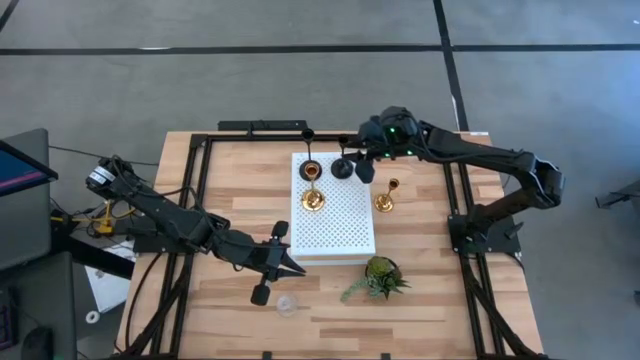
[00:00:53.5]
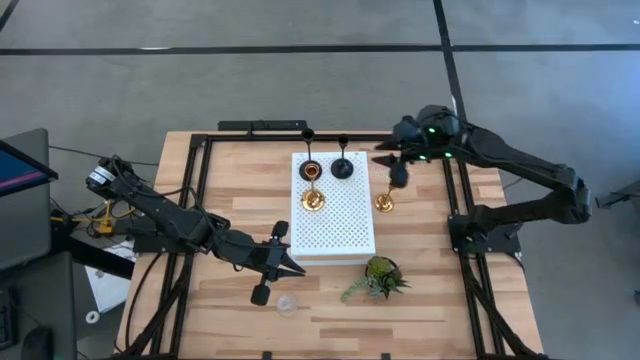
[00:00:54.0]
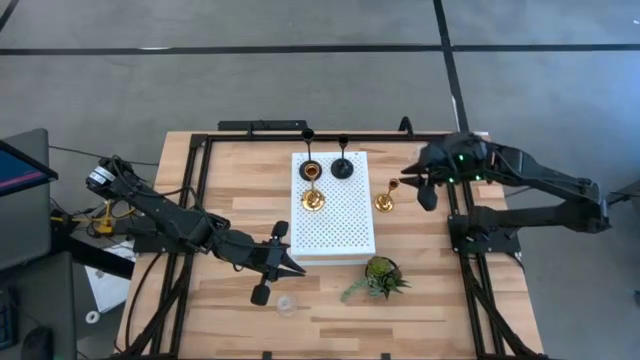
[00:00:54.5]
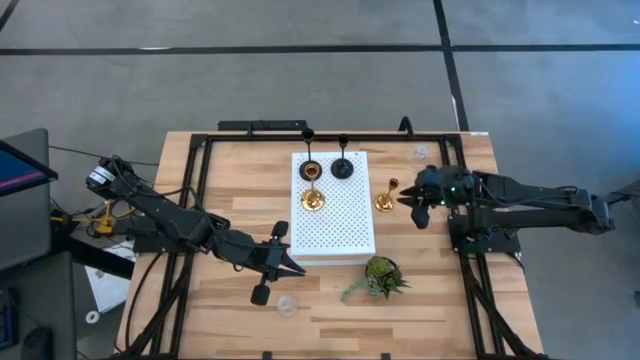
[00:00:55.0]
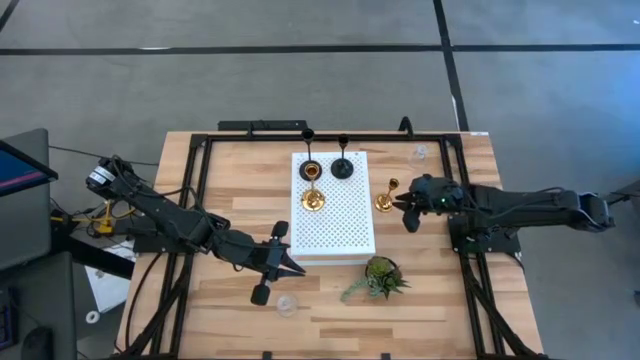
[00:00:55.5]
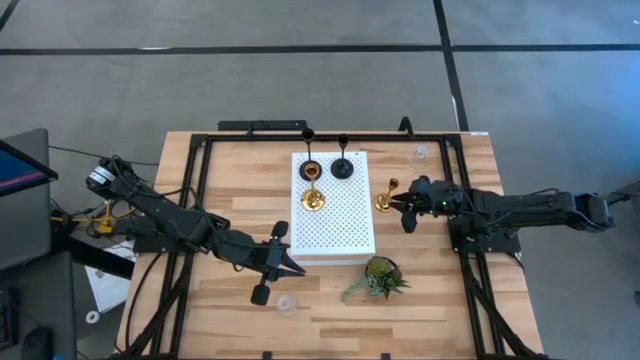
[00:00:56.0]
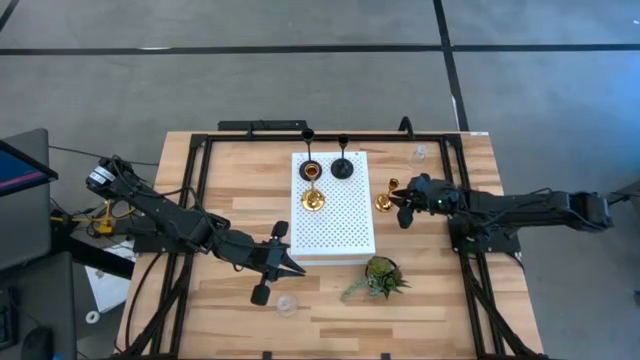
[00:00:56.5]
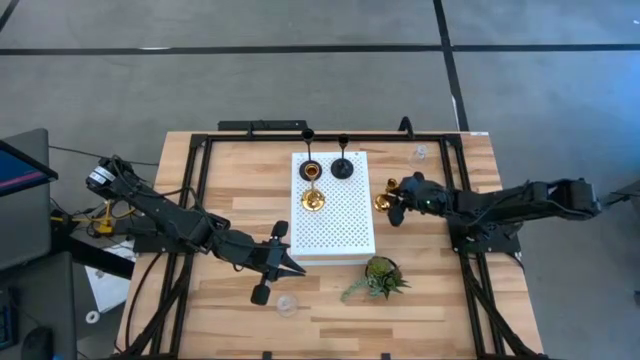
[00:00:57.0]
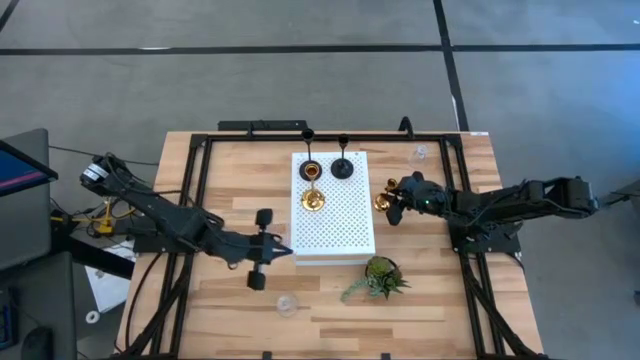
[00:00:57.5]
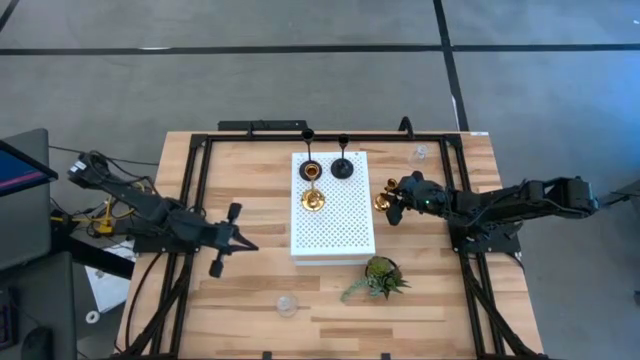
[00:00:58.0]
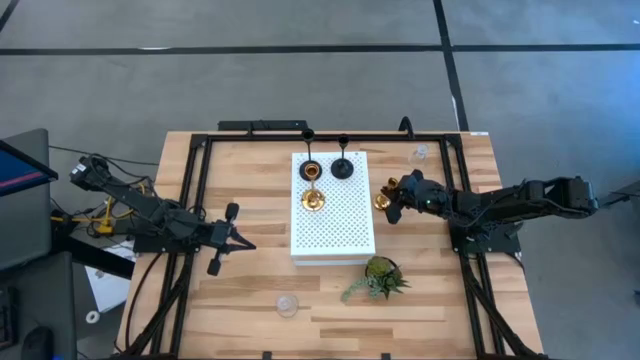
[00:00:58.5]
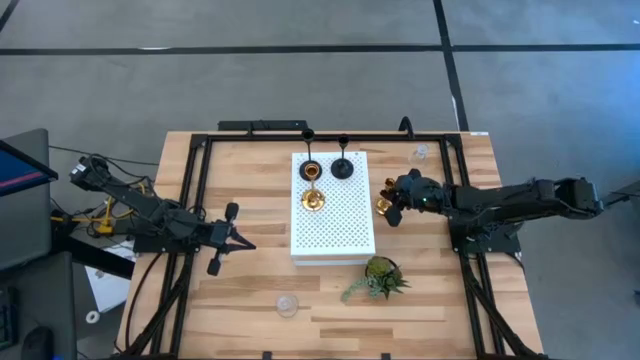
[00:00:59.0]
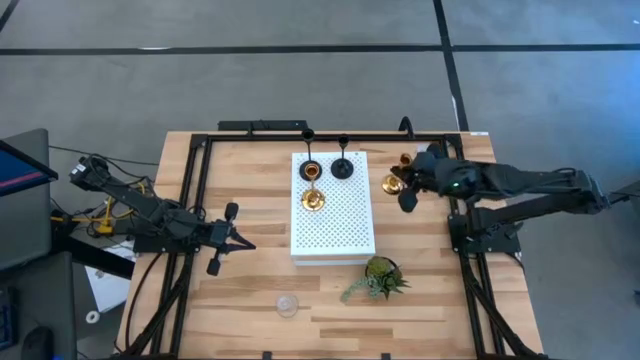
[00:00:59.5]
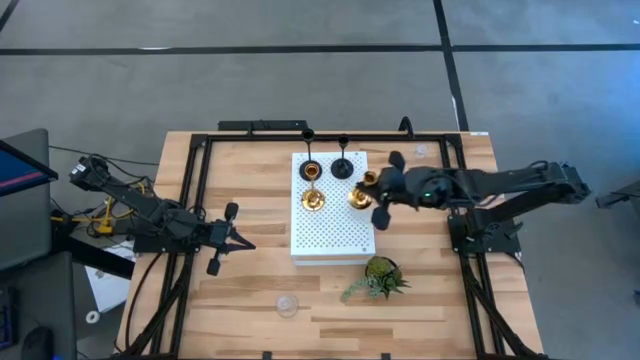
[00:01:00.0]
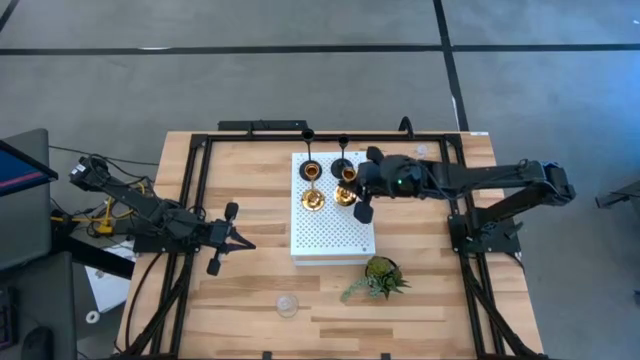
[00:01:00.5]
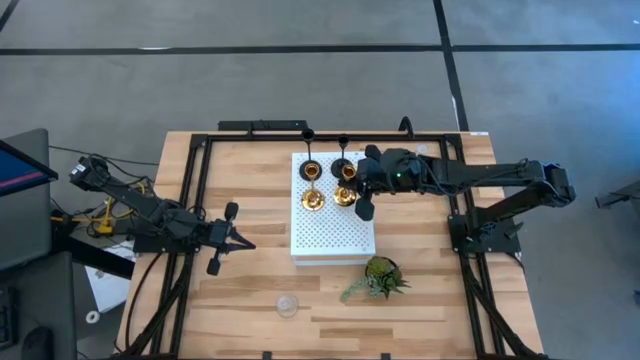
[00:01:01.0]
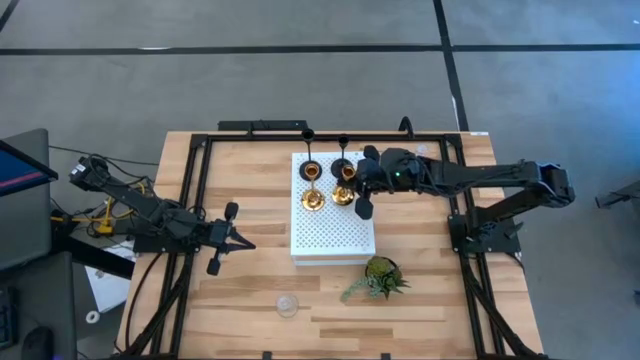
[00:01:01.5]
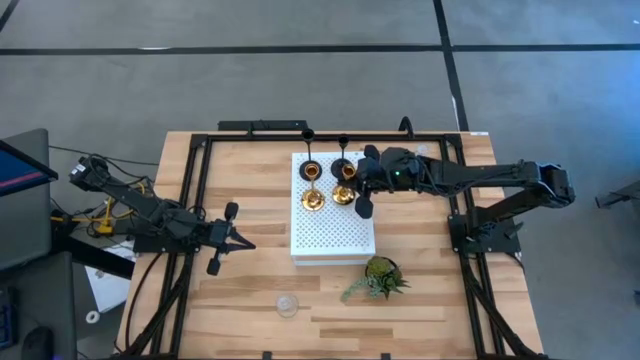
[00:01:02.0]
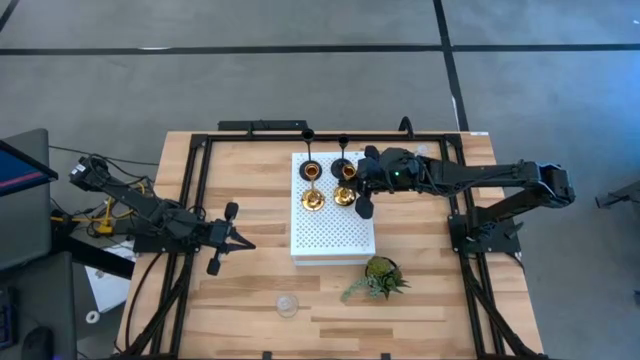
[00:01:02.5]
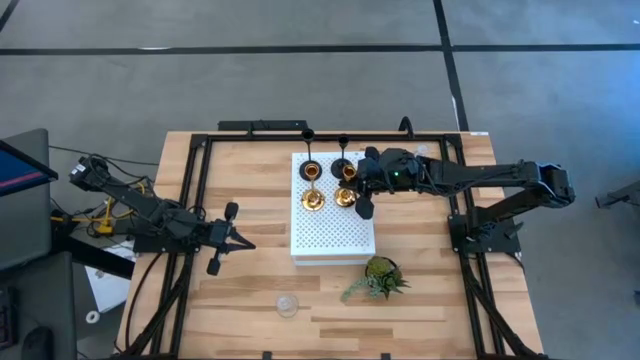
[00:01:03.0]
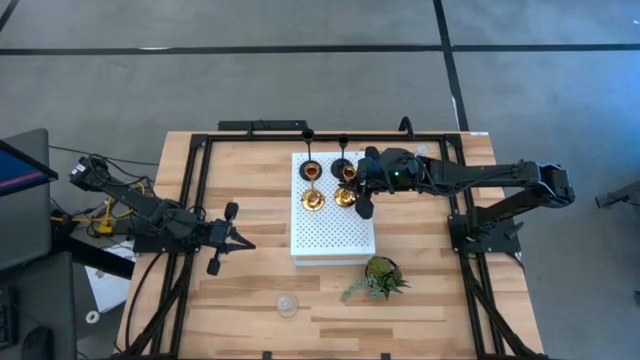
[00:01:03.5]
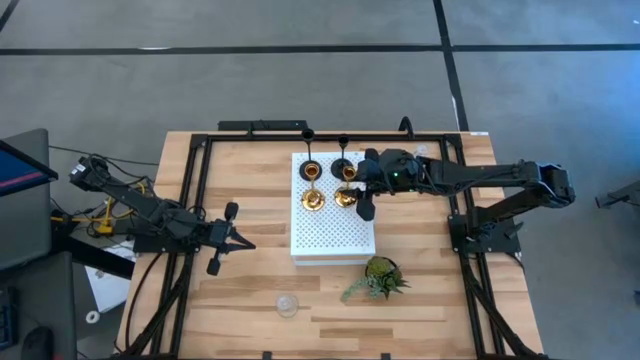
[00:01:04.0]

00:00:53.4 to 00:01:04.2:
Task: Pick & Place candle stick holders
Put the gold candle holder on the shelf

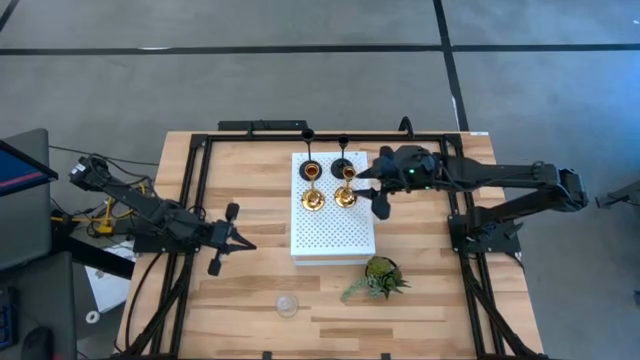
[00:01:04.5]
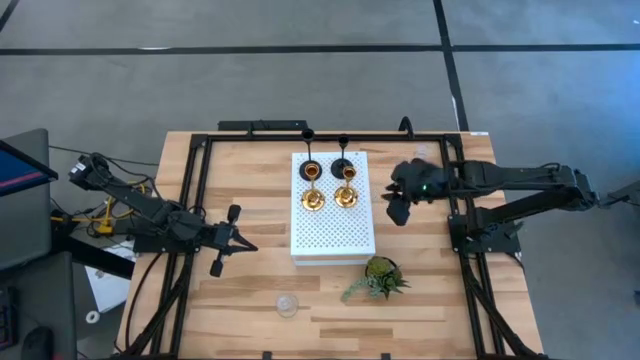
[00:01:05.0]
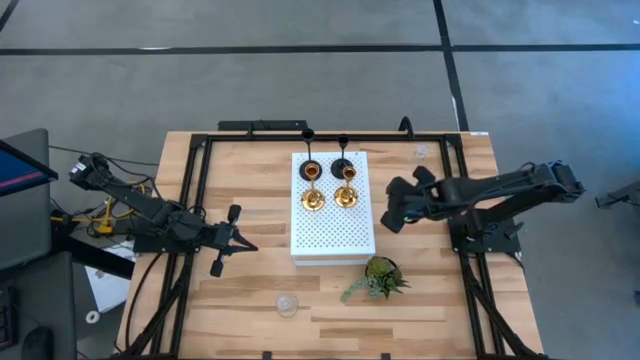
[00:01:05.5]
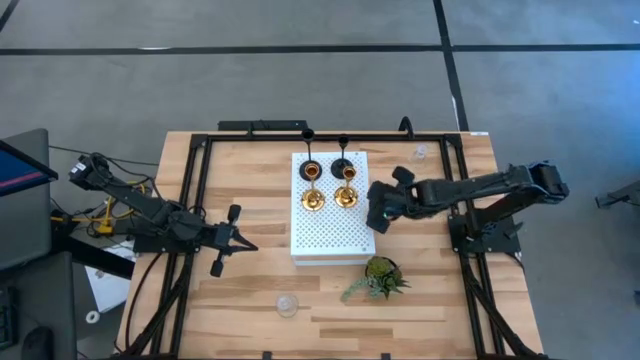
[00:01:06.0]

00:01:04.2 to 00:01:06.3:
Adjust the shelf on the table

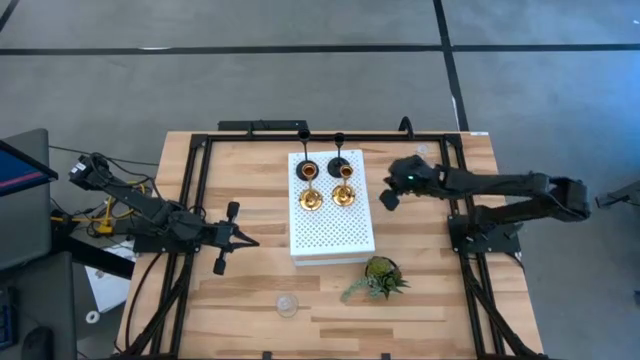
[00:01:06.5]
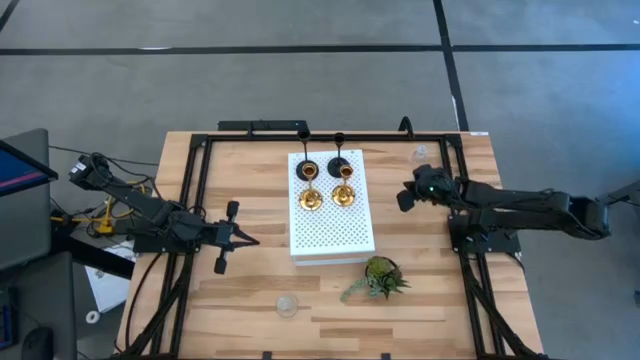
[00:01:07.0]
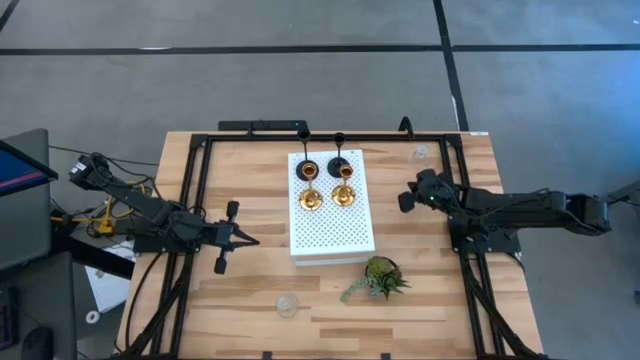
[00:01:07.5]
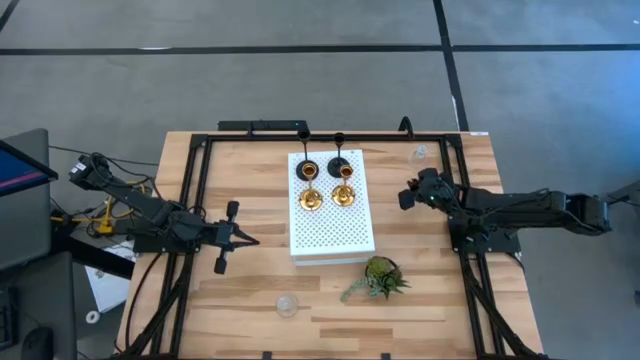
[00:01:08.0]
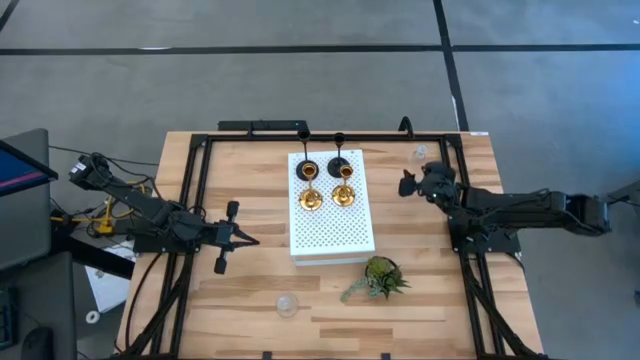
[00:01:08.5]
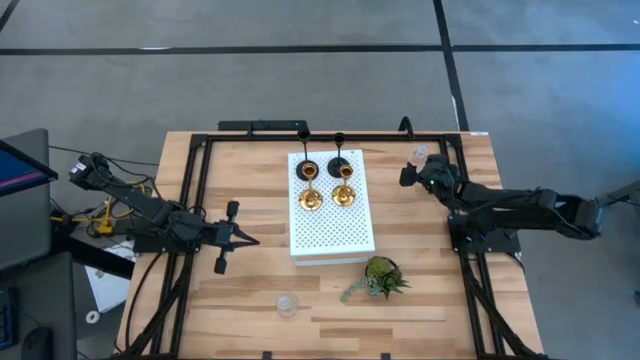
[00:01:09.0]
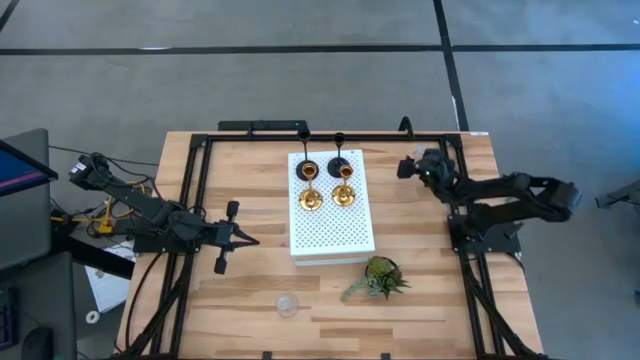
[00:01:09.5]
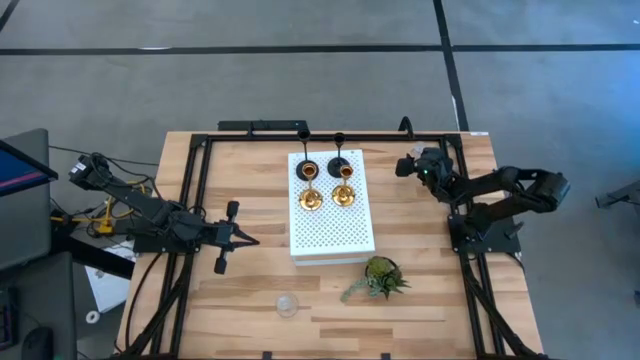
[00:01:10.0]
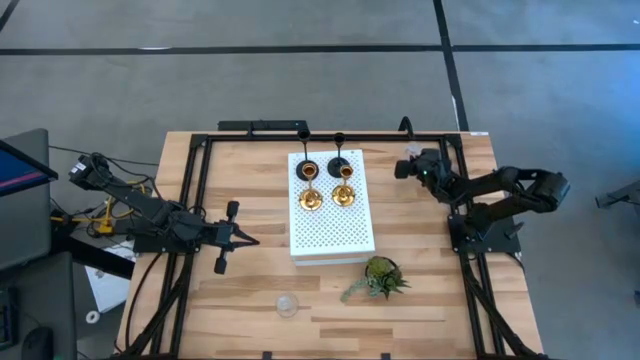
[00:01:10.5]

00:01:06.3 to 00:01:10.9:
Put the top glass candle holder on the shelf
